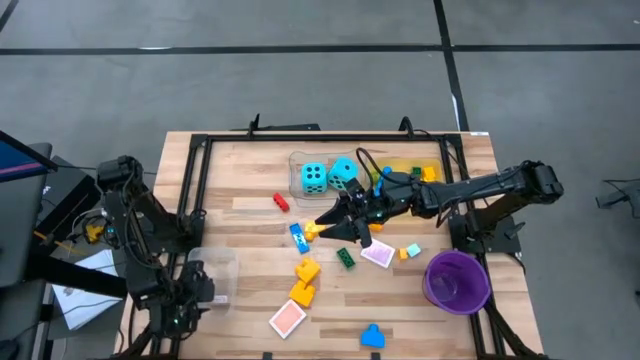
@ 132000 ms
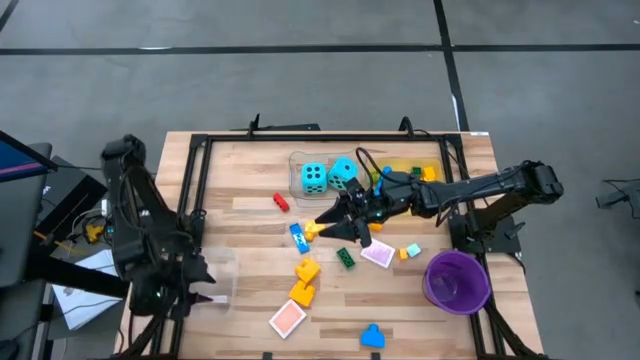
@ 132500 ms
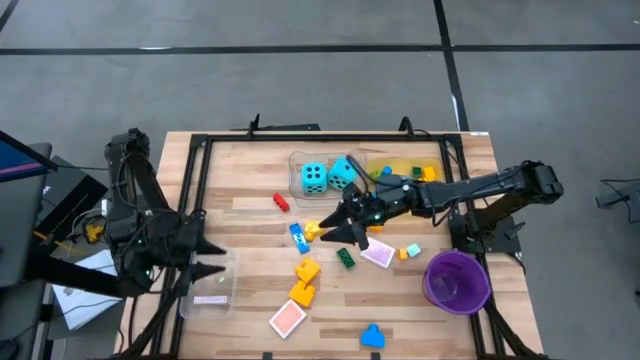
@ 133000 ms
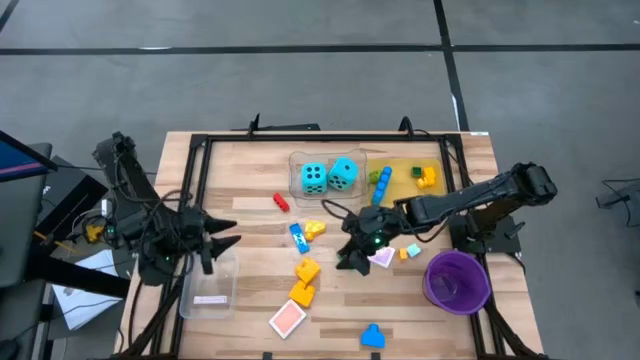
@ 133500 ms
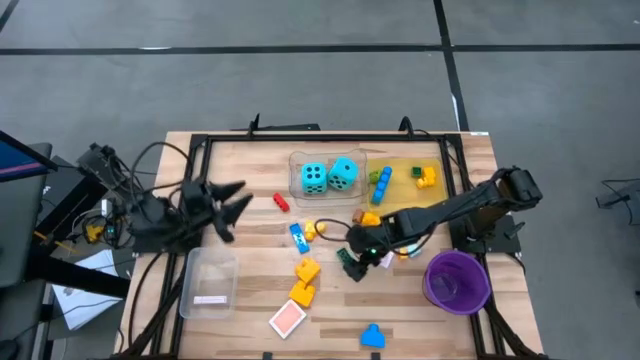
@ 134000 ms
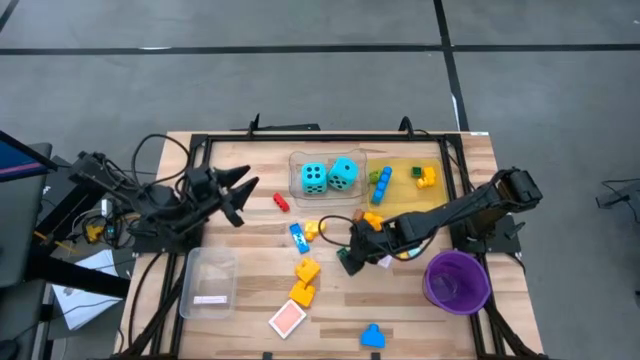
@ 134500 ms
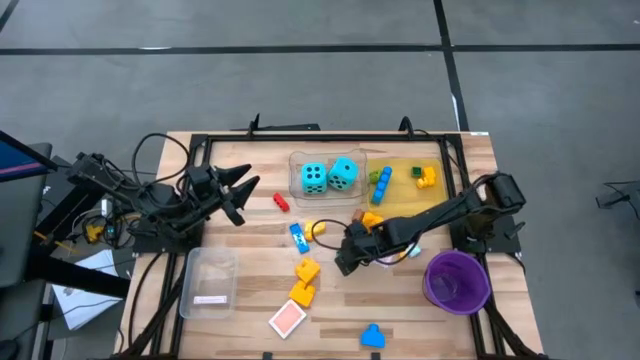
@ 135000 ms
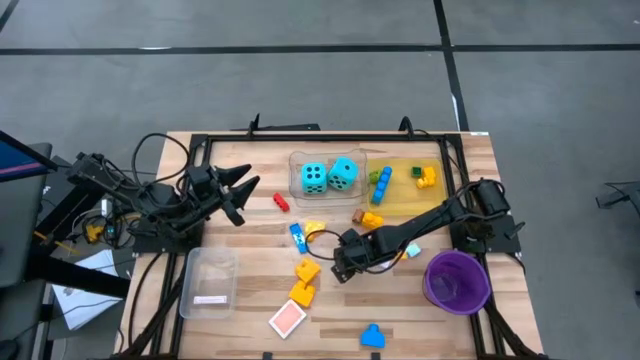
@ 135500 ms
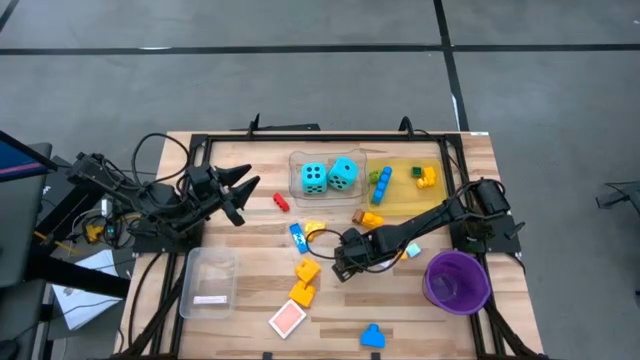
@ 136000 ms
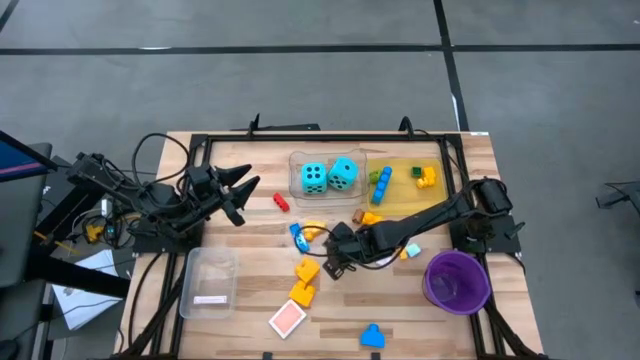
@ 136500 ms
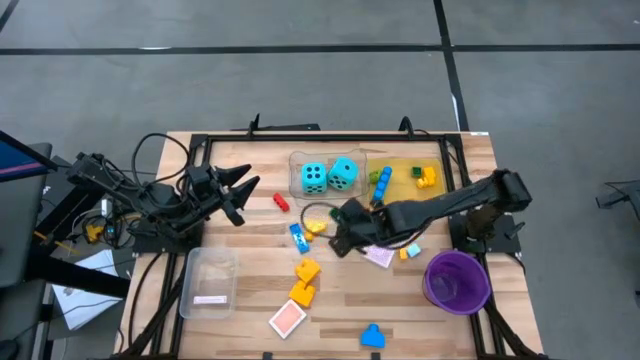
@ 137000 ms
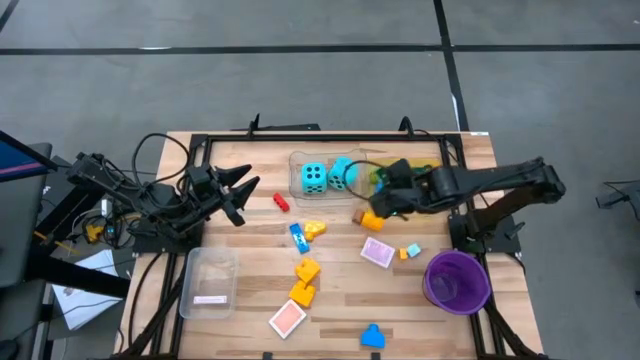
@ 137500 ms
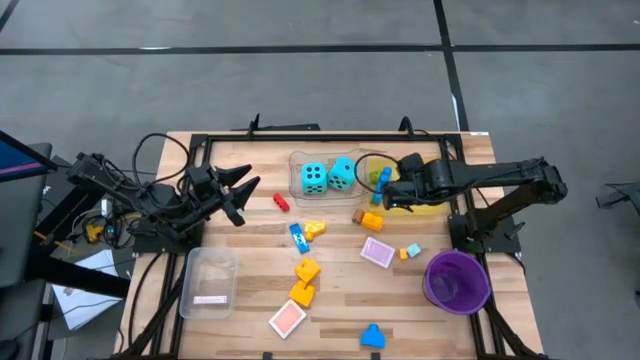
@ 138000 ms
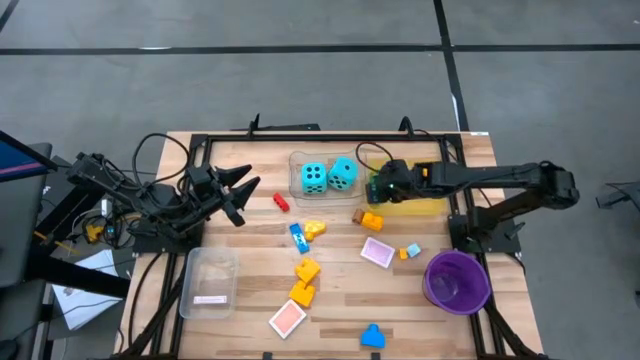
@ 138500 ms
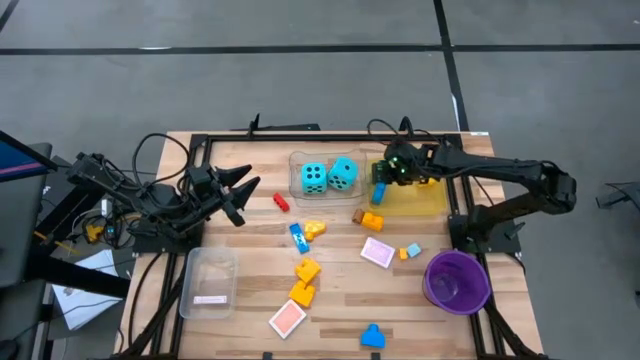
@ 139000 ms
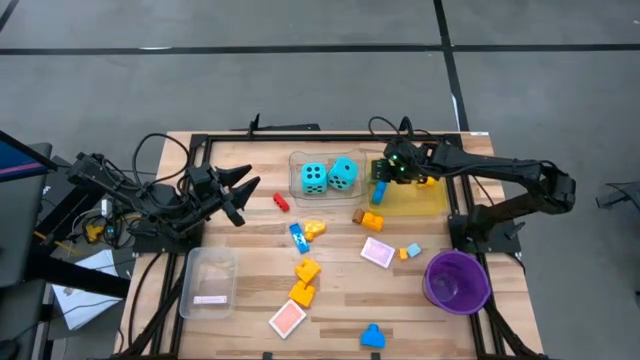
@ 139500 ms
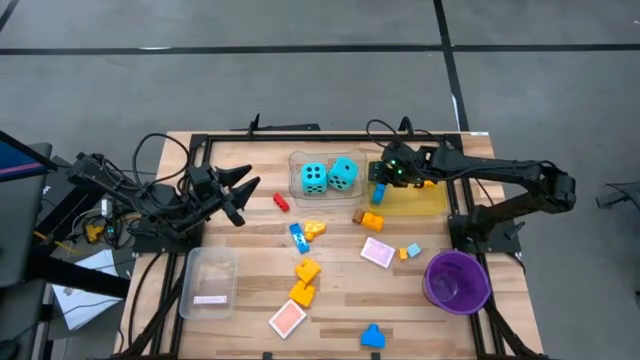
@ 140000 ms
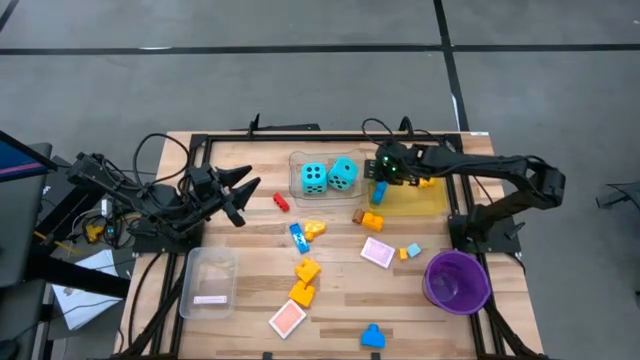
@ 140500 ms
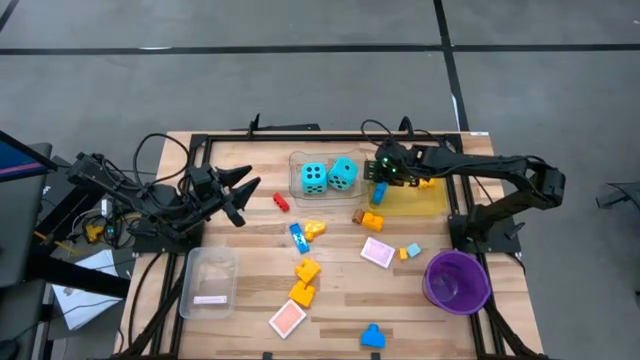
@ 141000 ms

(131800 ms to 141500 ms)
Task: Pick & Place Toys
Put the green game piece into the yellow bin

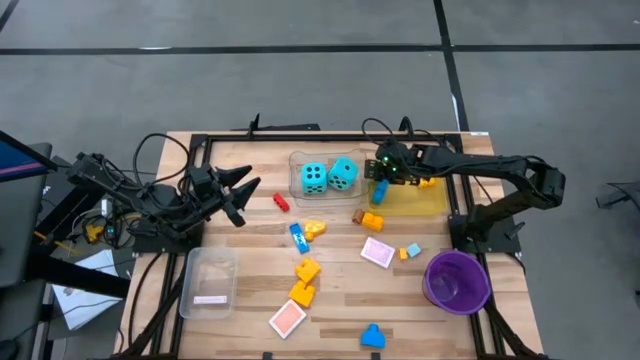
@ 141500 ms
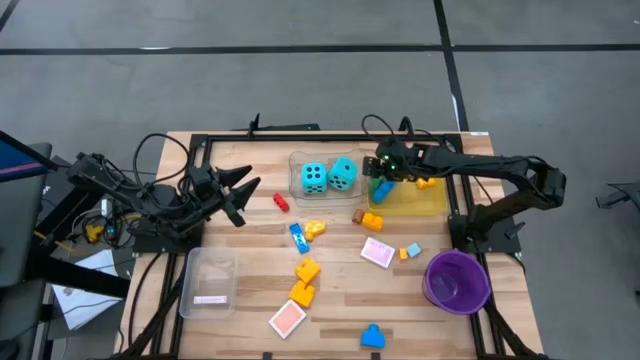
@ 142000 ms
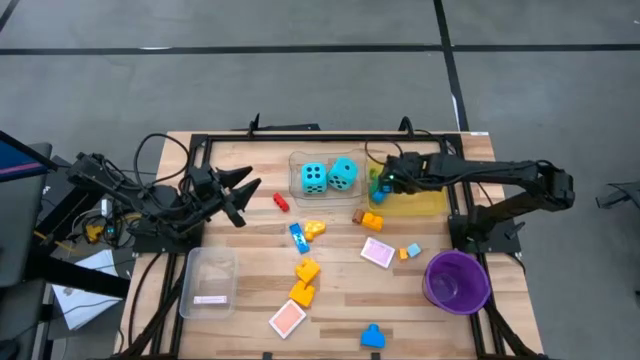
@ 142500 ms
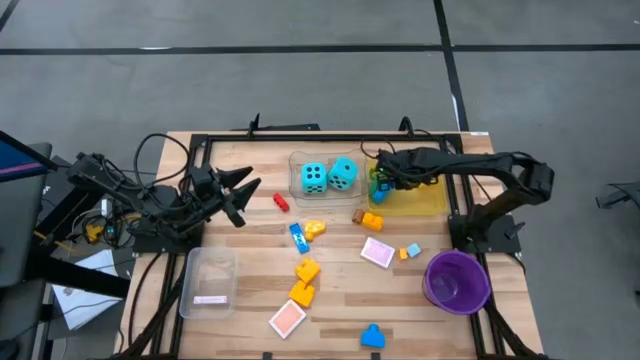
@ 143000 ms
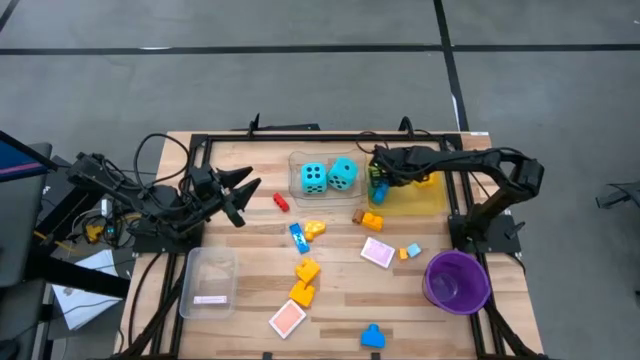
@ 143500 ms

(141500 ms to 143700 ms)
Adjust the blue game piece in the yellow bin

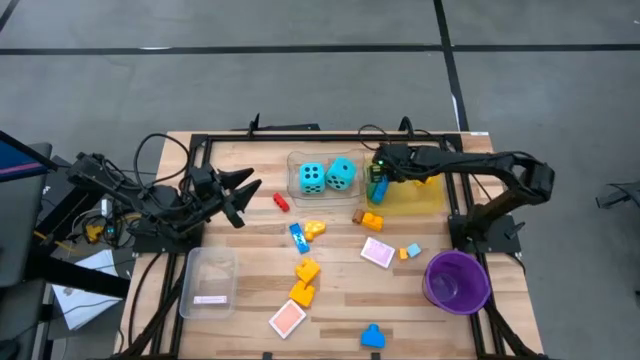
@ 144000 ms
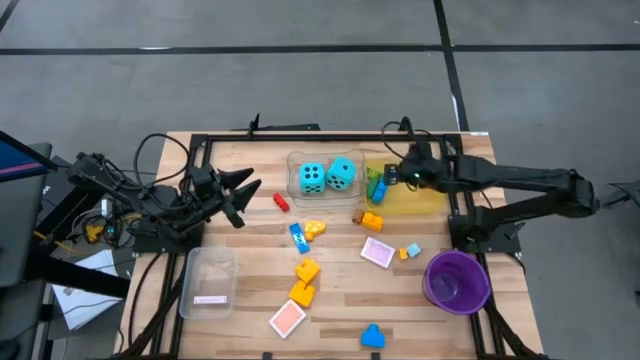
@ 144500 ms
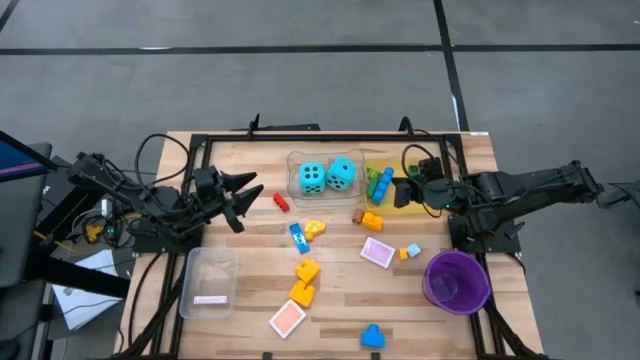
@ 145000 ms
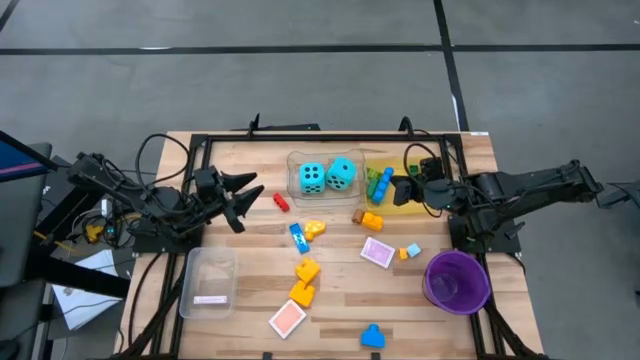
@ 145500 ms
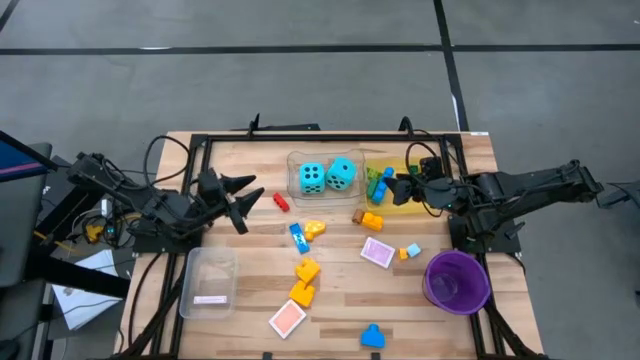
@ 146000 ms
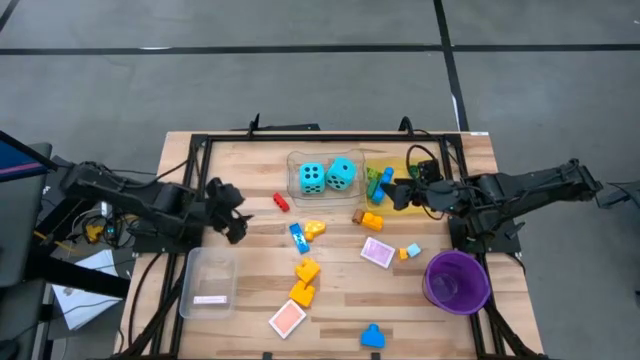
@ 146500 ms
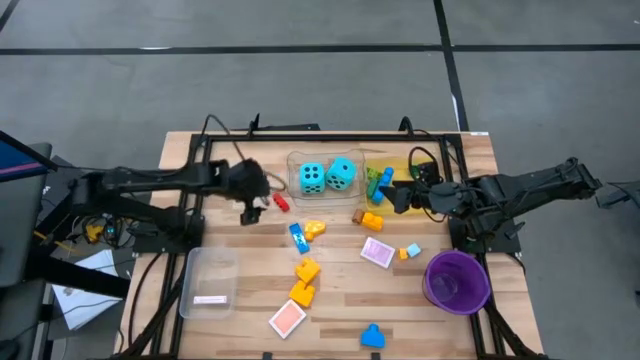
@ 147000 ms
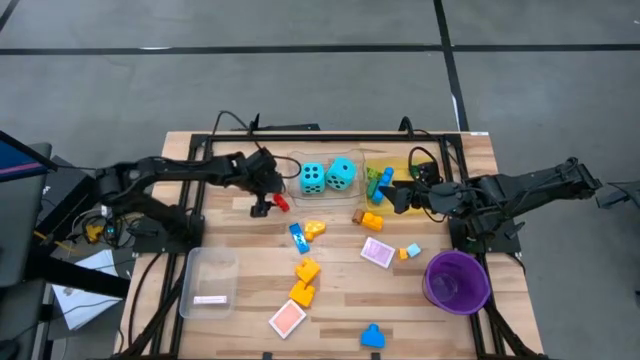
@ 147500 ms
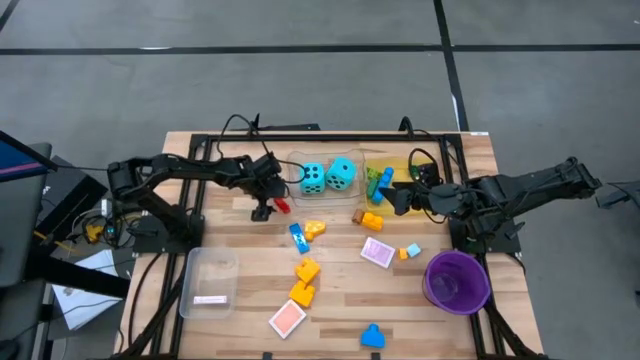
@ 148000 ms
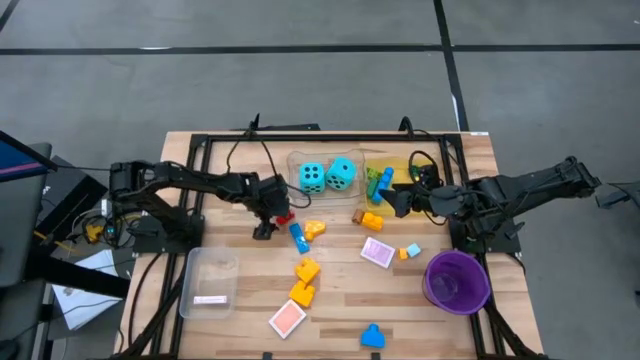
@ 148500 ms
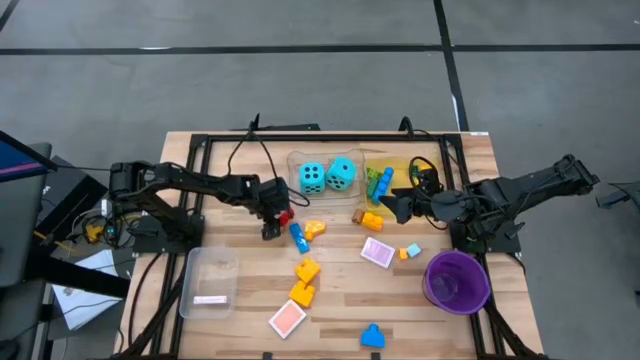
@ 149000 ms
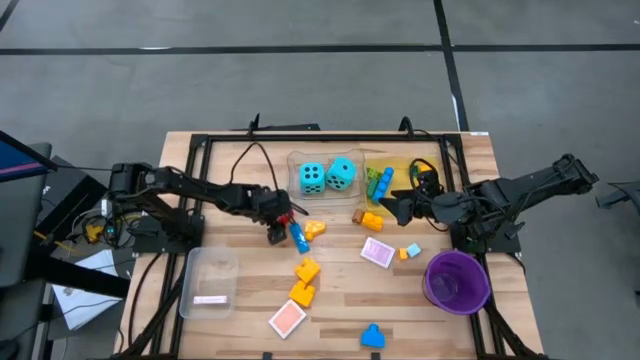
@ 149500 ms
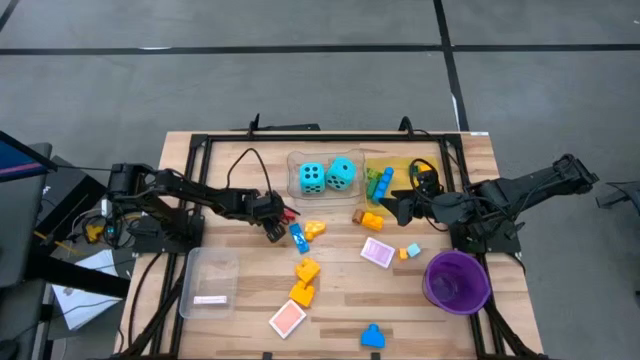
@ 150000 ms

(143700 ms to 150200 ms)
Put the red game piece into the yellow bin

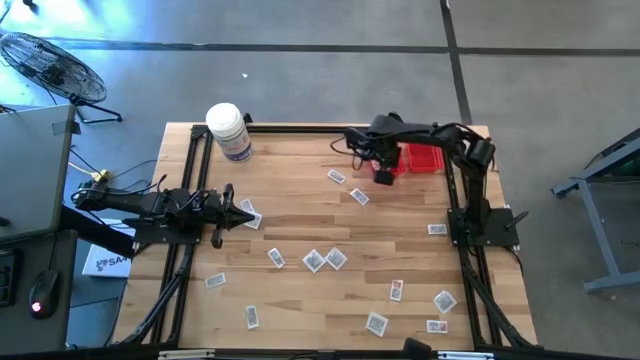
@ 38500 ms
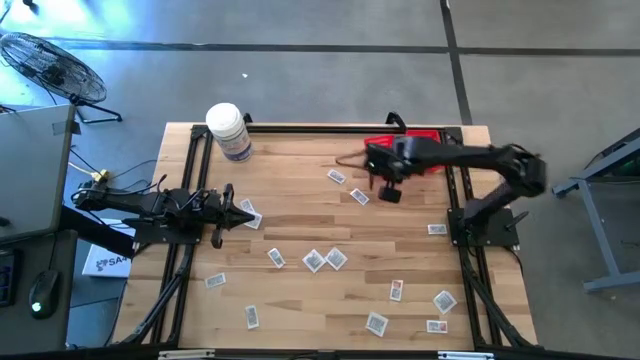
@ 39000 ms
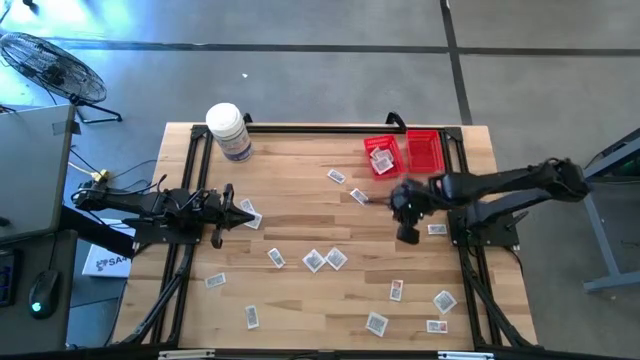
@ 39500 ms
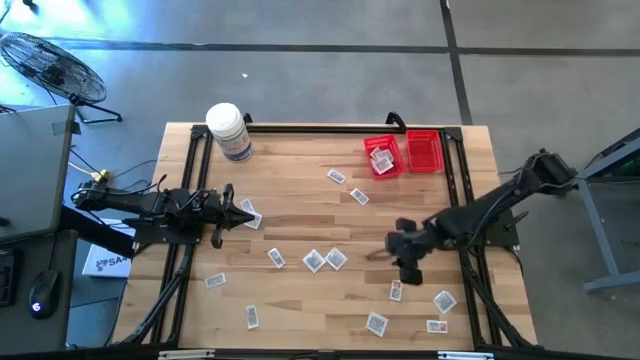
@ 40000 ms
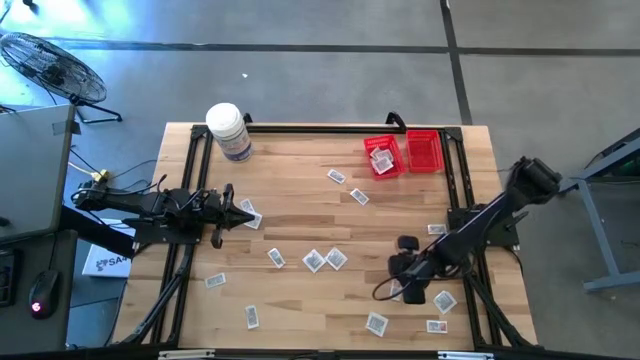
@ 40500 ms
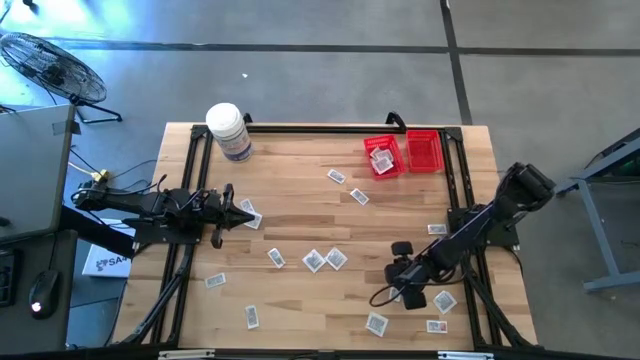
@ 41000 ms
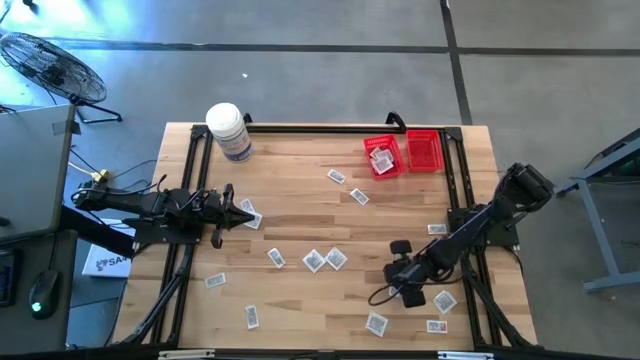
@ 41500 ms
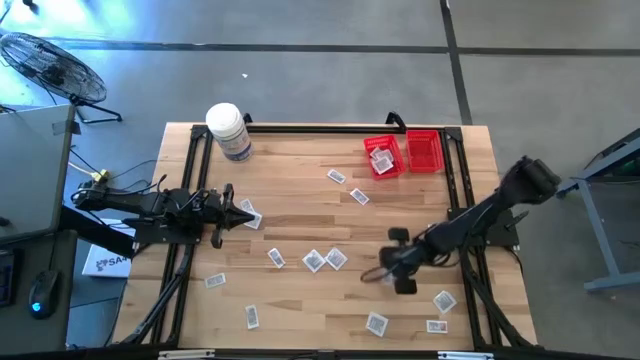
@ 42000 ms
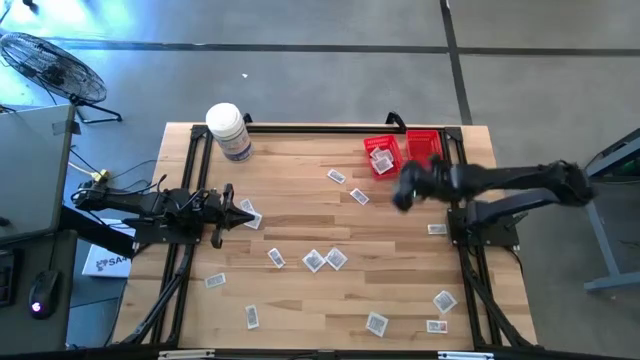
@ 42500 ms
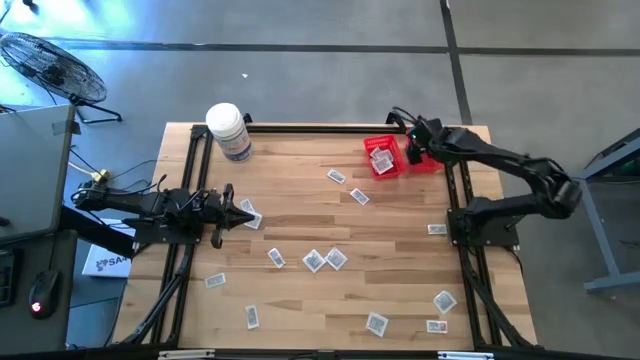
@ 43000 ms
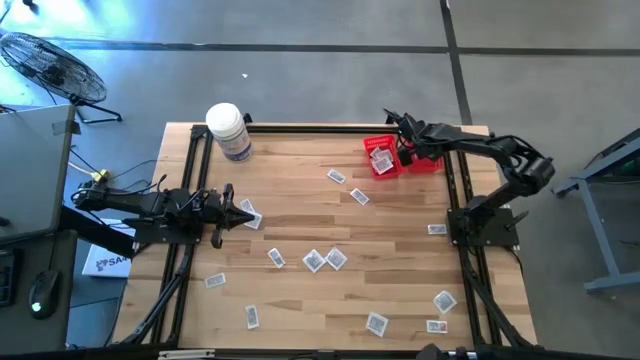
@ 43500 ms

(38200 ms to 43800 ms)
Task: Pick & Place First Aid Supplies
Put the ointment pack into the right red bin
